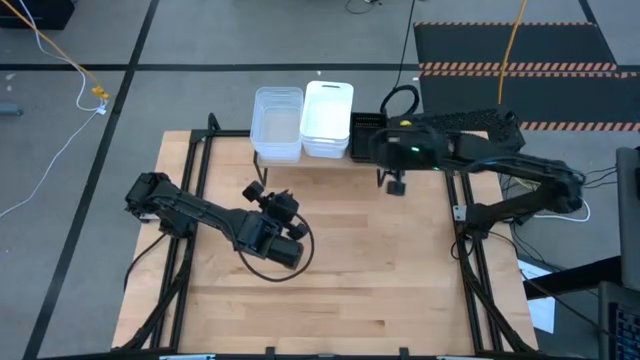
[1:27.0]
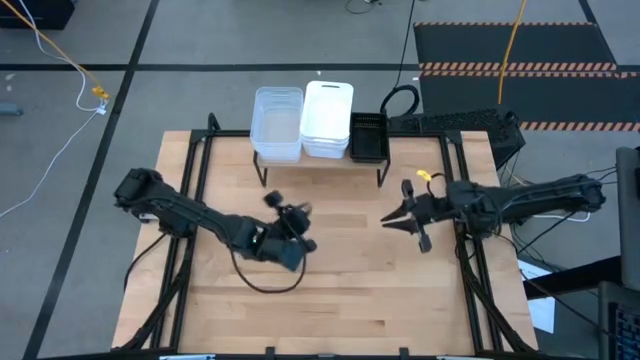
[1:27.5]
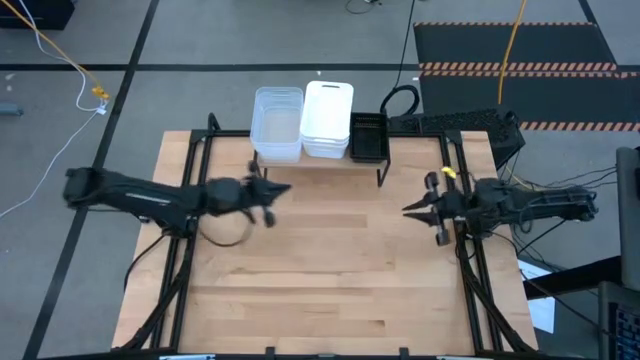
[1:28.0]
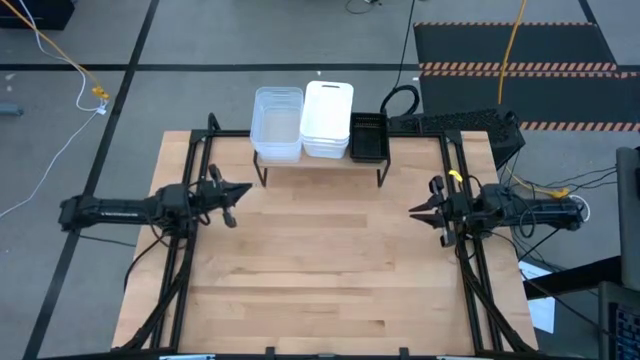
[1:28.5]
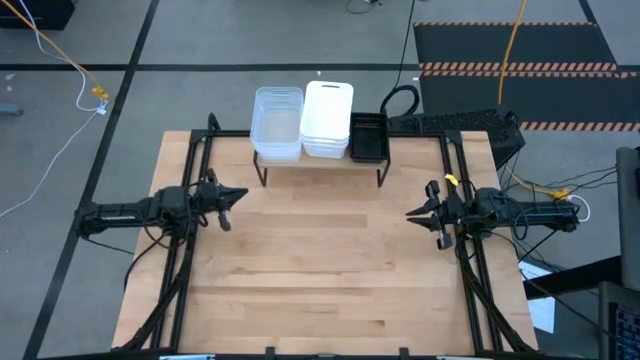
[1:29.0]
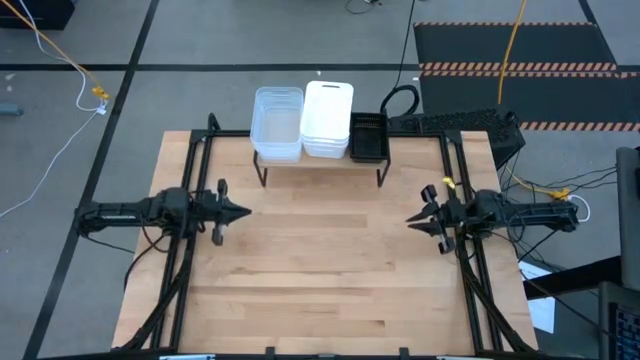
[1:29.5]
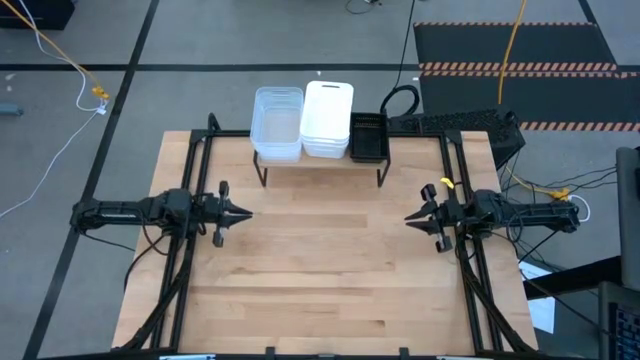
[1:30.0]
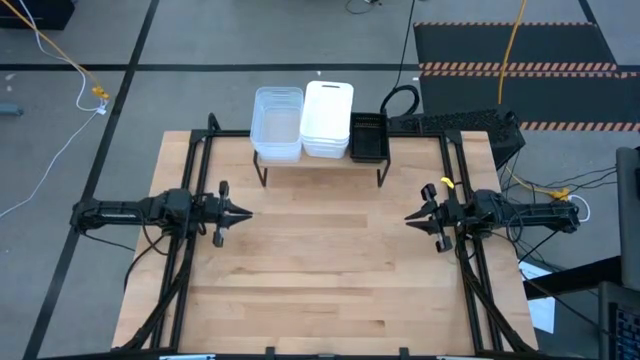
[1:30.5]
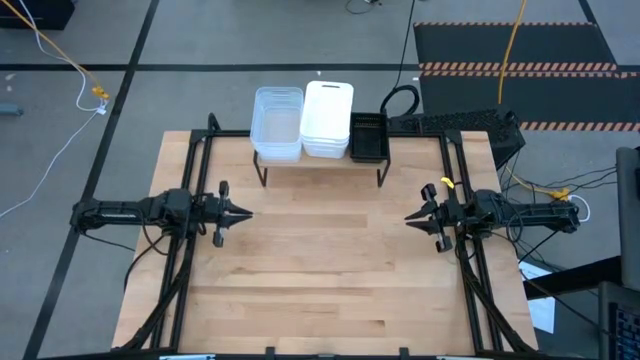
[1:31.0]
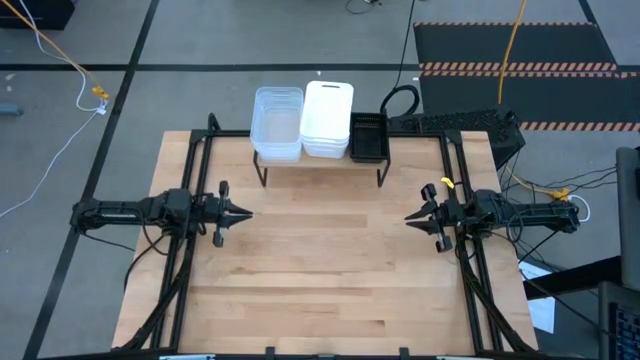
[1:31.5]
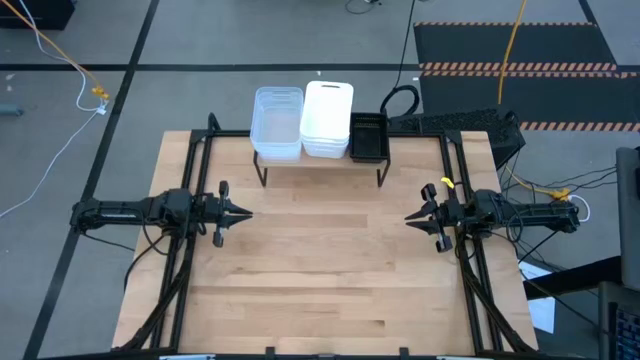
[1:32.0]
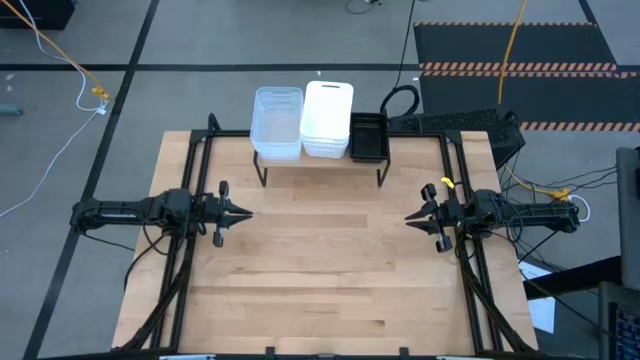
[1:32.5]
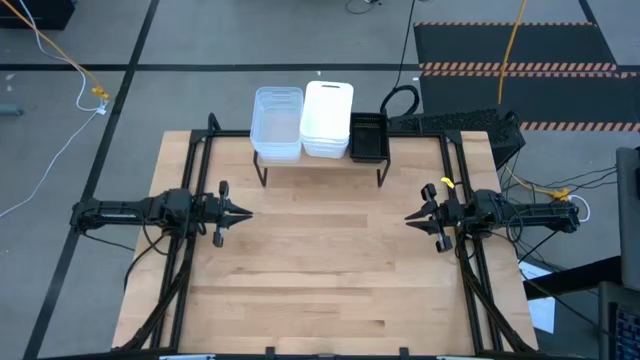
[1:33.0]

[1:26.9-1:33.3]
Task: Stack baskets on shelf by color
Return to Home Position

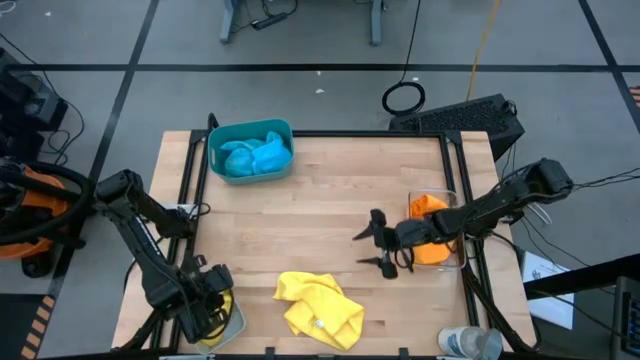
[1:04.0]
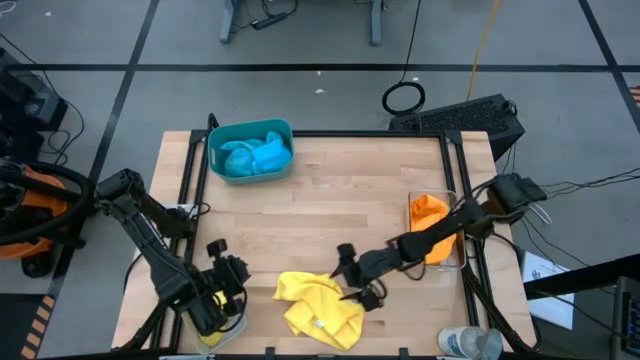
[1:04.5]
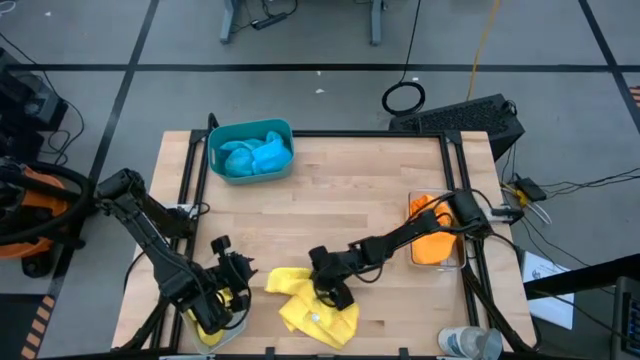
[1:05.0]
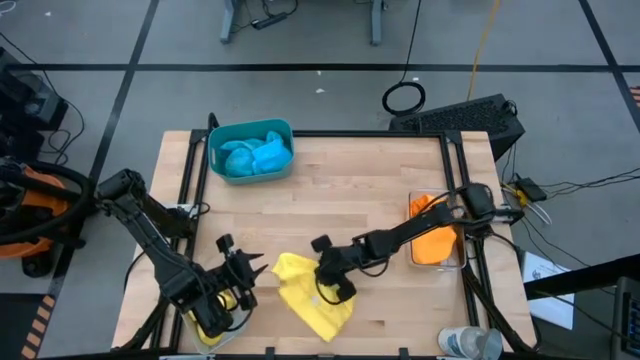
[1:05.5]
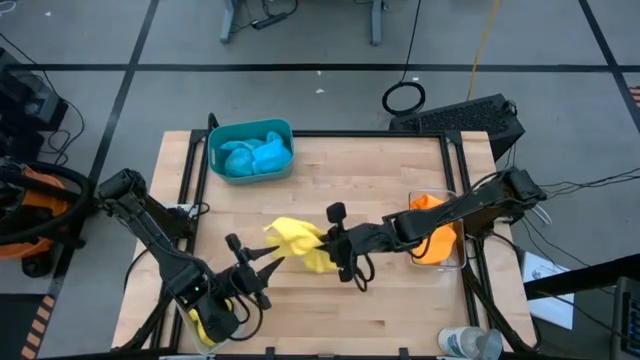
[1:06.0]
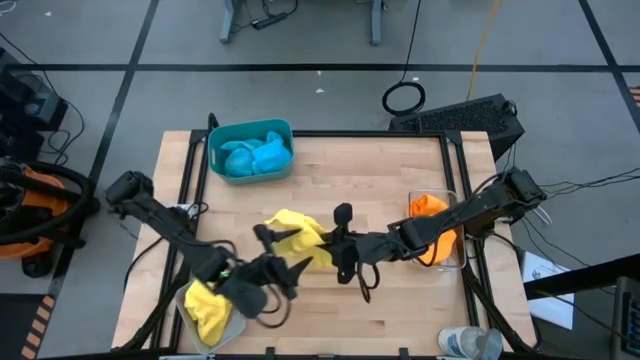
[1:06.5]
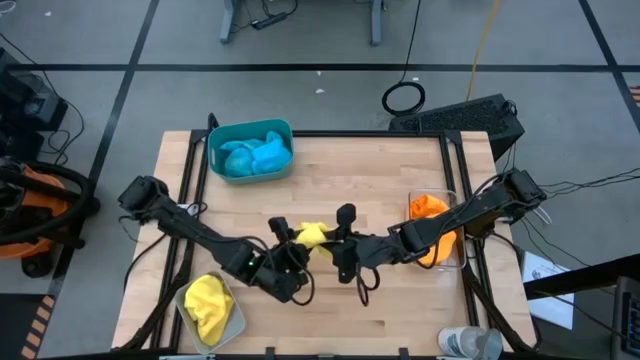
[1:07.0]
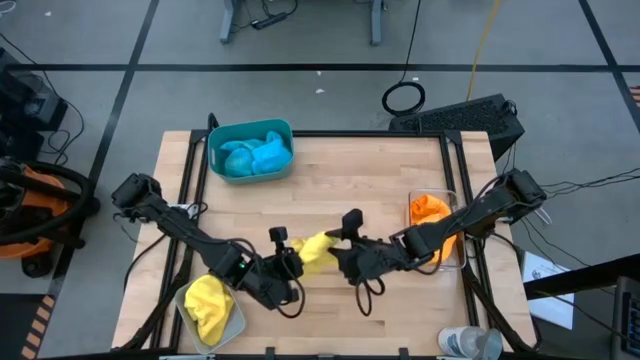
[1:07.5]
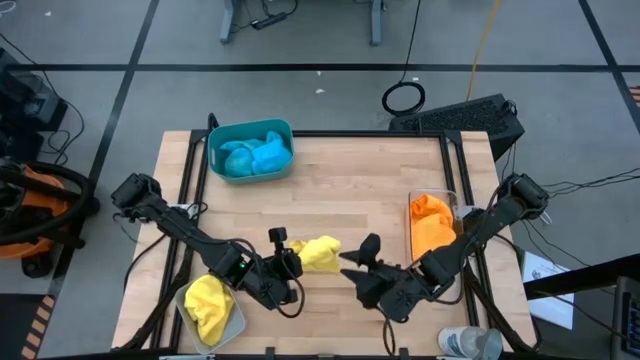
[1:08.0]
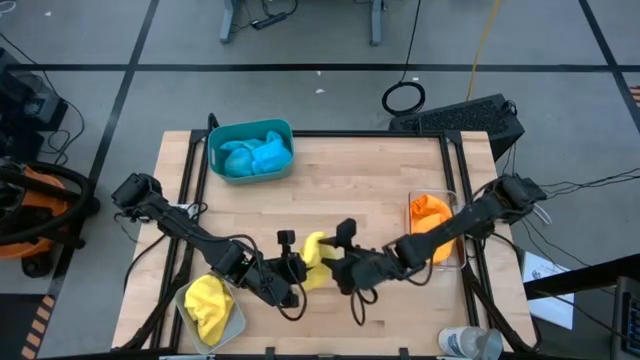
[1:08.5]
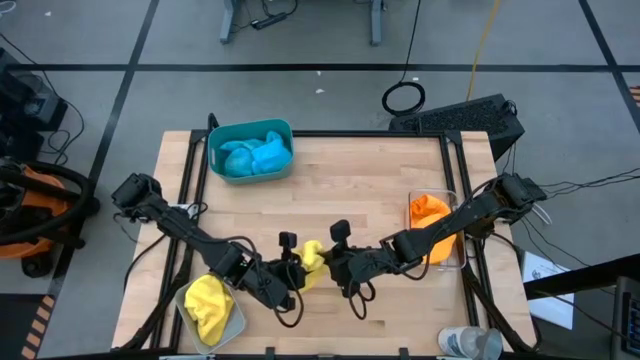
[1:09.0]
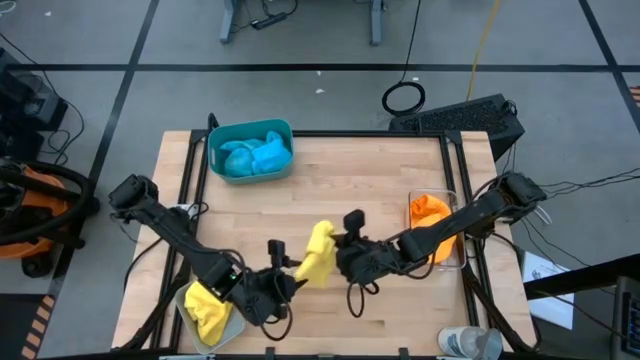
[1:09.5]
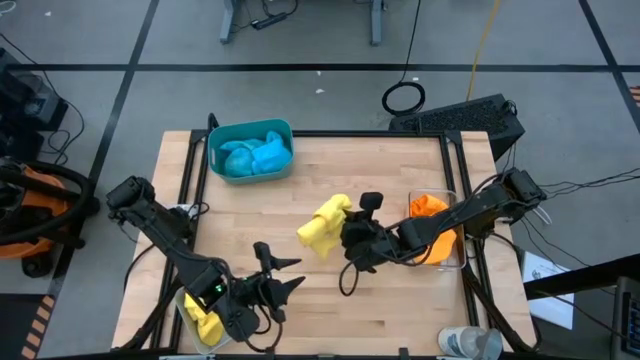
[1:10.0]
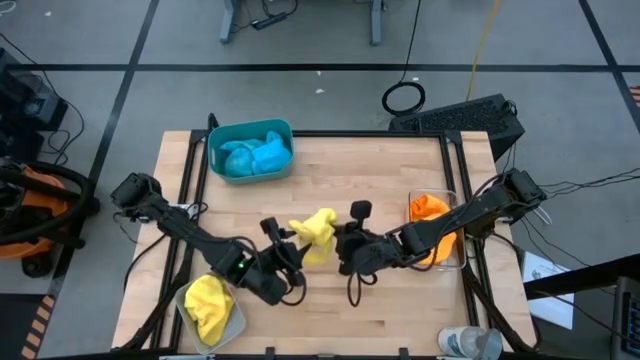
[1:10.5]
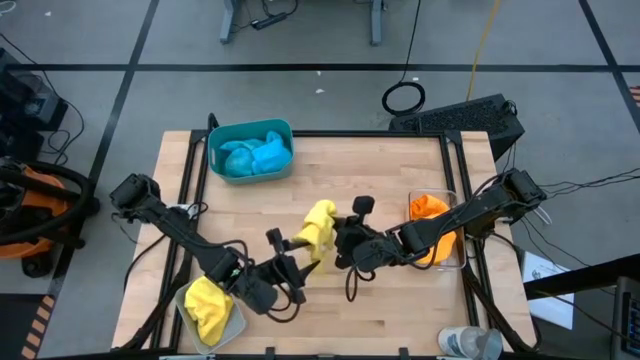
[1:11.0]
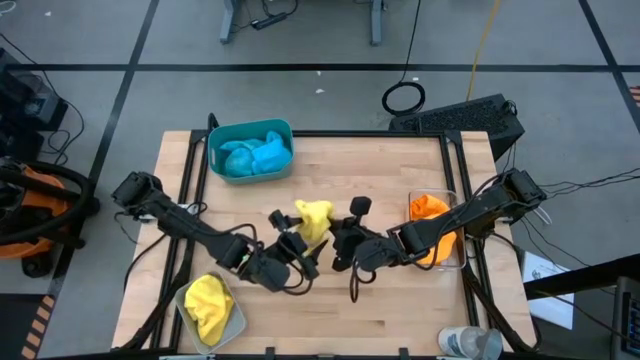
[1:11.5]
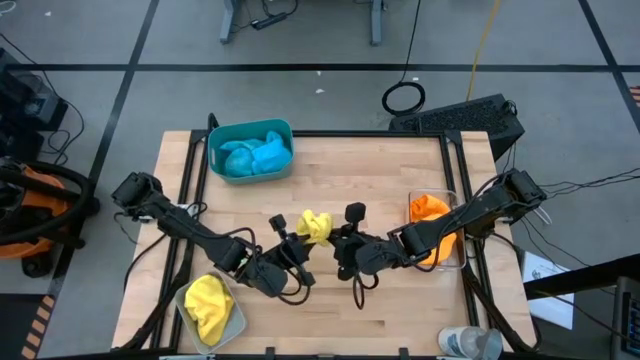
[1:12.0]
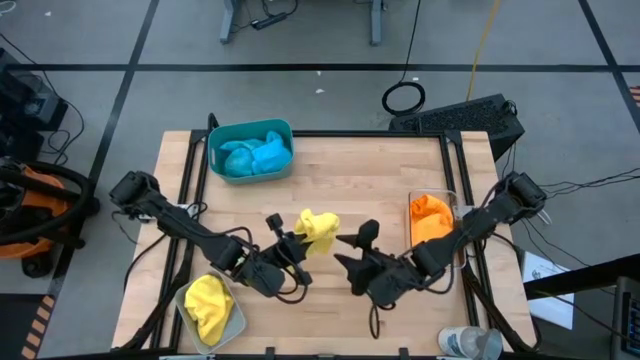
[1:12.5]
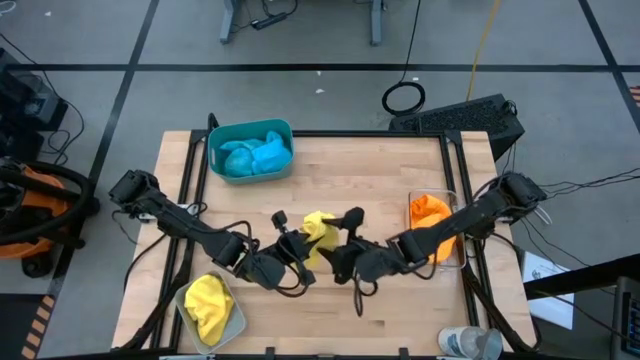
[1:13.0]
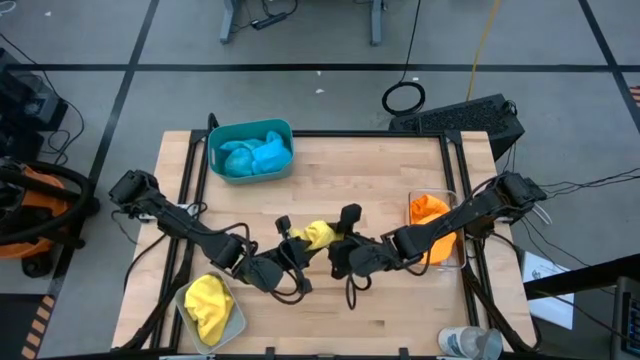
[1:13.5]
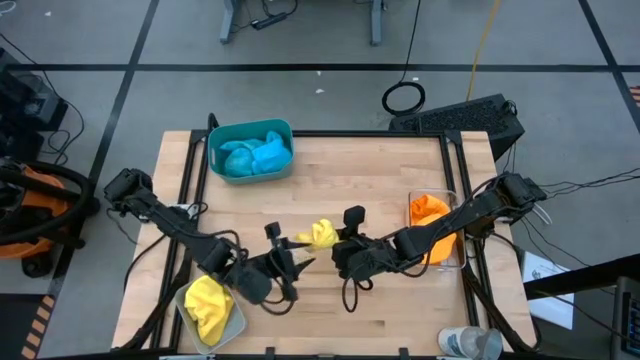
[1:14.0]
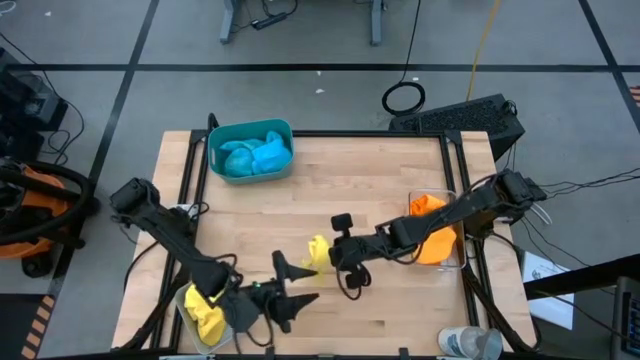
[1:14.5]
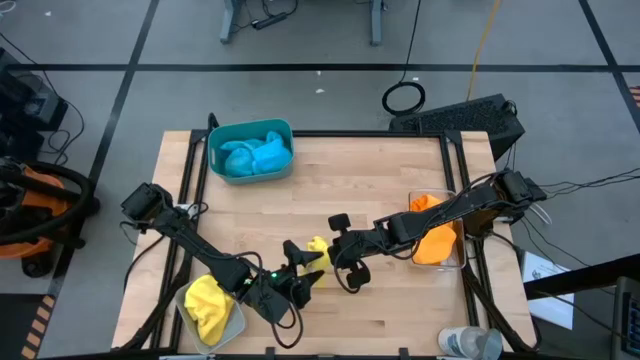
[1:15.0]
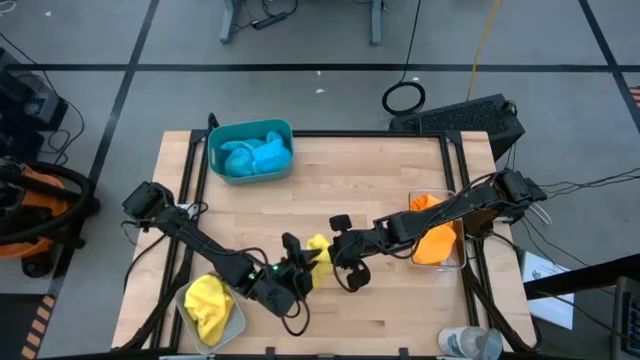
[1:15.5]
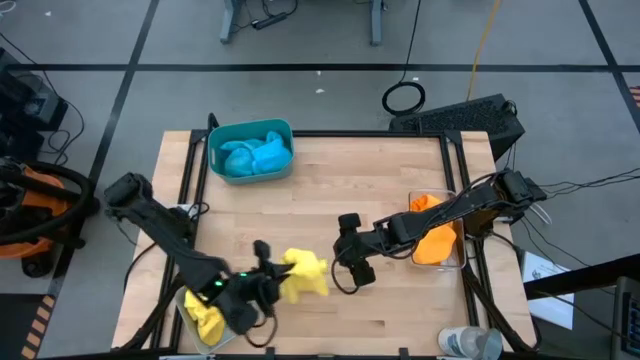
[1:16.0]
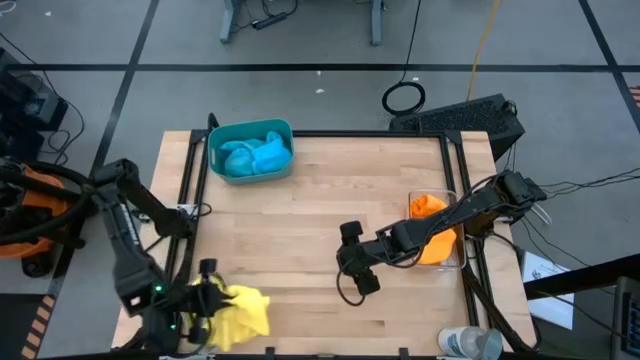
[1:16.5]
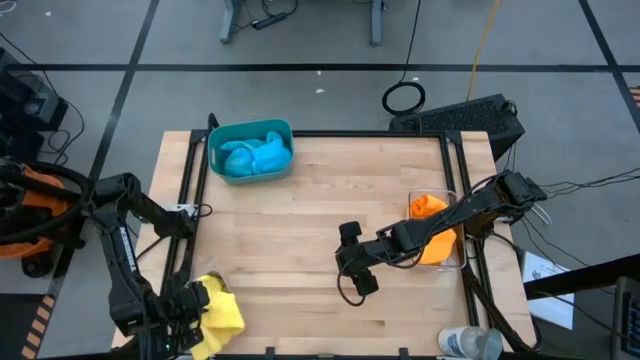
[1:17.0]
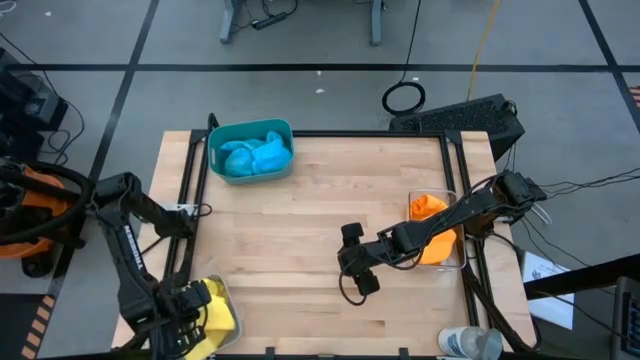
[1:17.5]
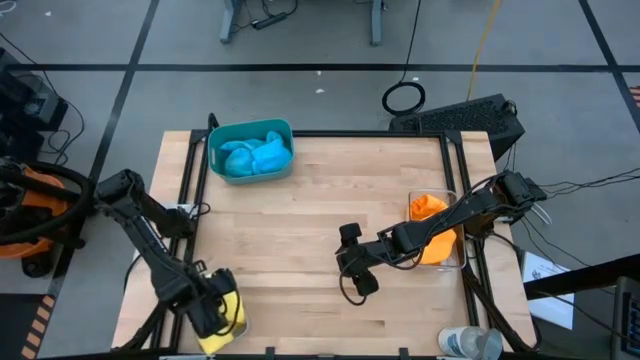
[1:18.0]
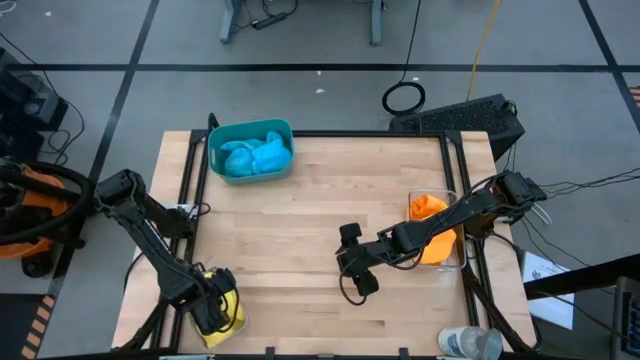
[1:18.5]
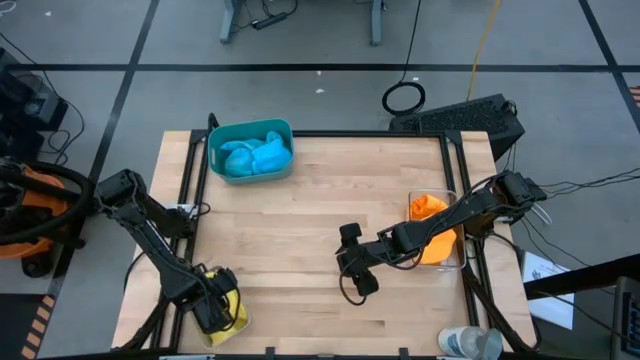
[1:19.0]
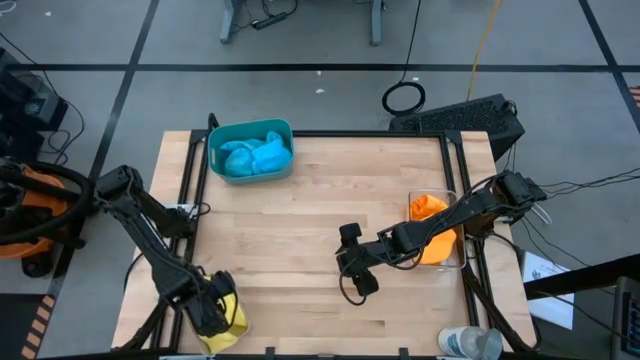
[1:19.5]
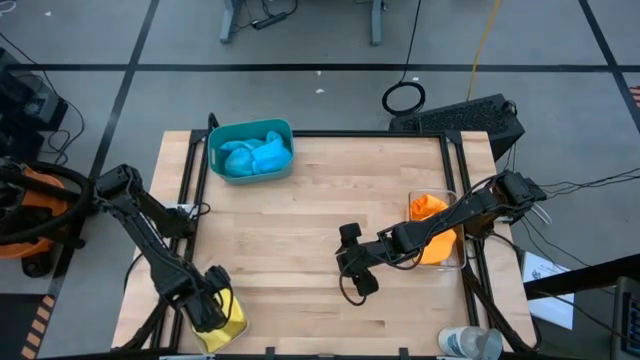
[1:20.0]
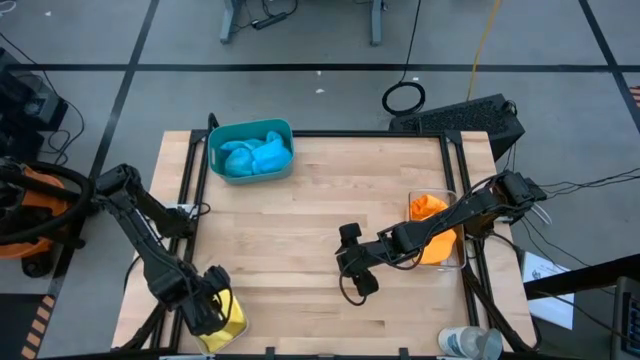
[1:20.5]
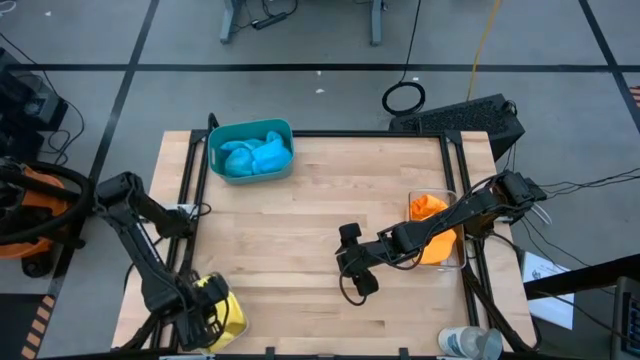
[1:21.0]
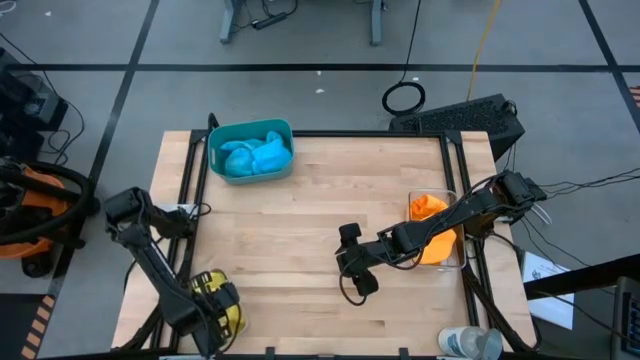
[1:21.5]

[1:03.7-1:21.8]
Task: Sort microfiber towel by color & place in baskets
Put the yellow microfiber cloth into the gray bin
